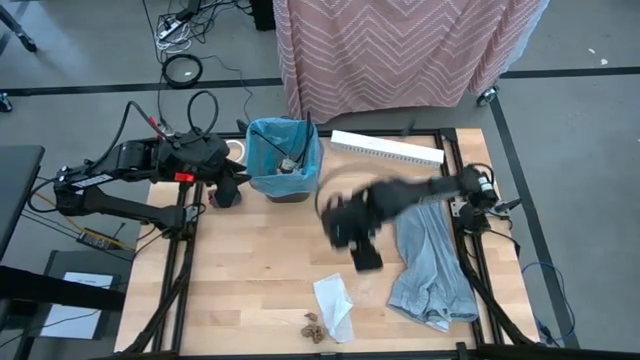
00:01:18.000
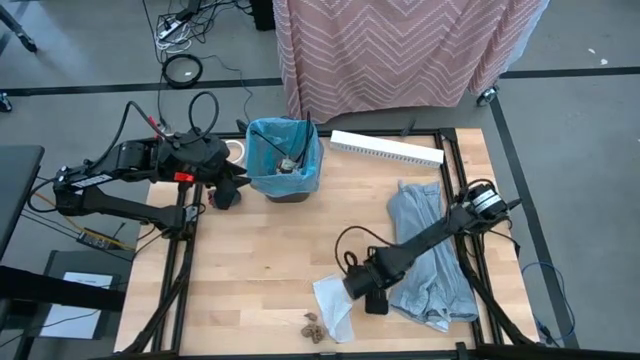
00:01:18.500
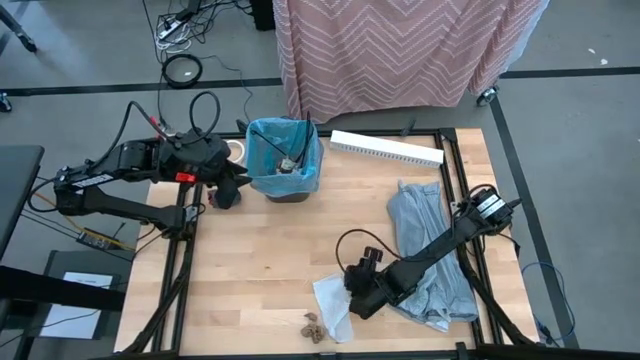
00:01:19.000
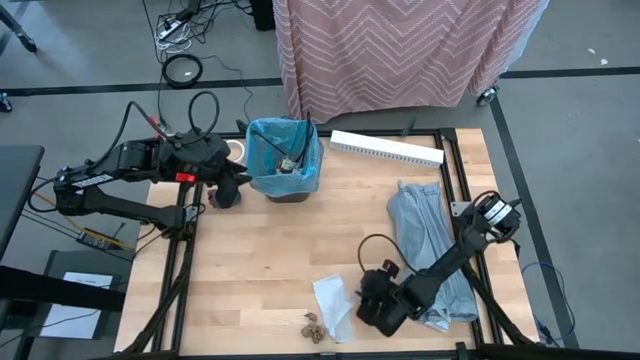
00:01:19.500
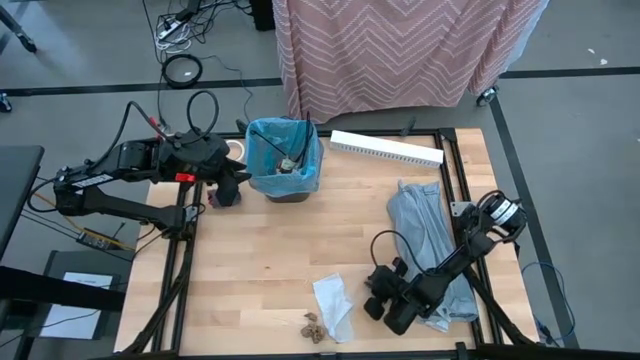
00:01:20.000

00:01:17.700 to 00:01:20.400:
Task: place trash/remove bag and relplace
Put the transparent piece of plastic into the black trash bin

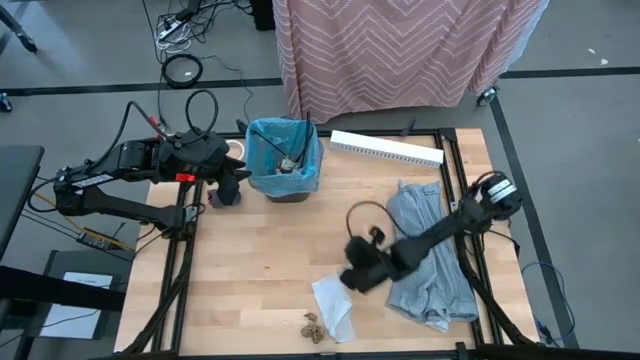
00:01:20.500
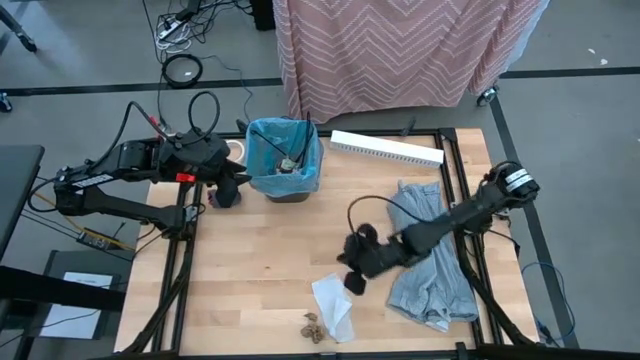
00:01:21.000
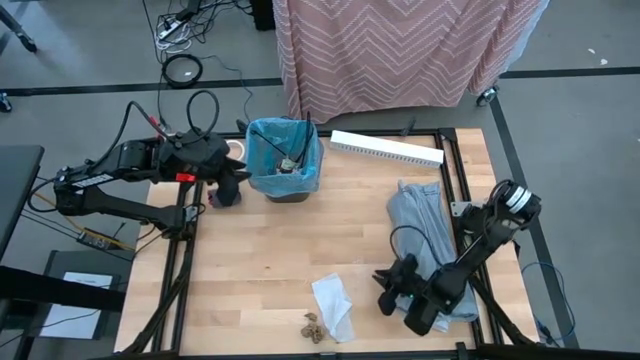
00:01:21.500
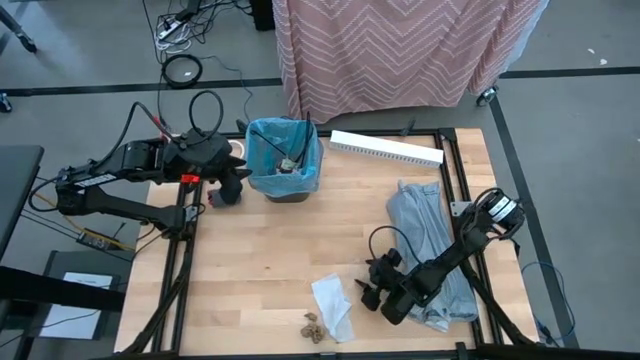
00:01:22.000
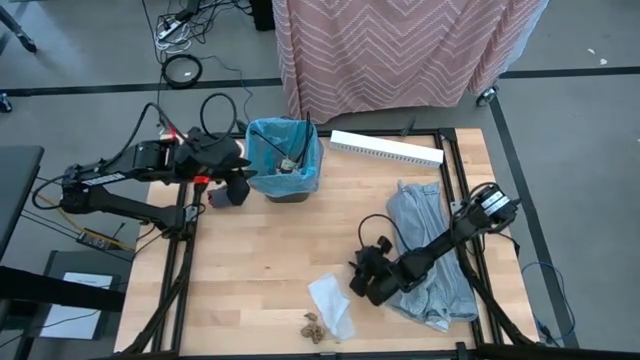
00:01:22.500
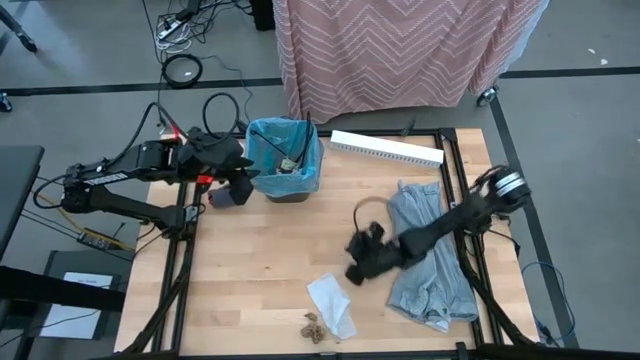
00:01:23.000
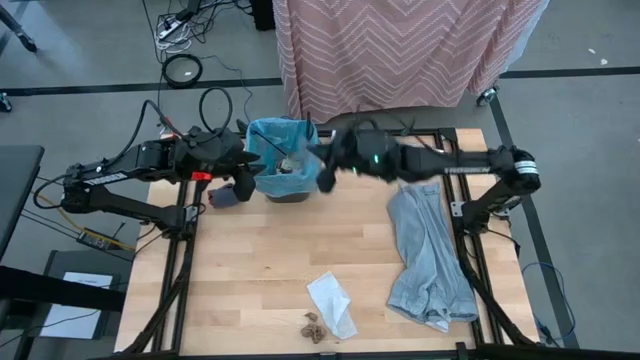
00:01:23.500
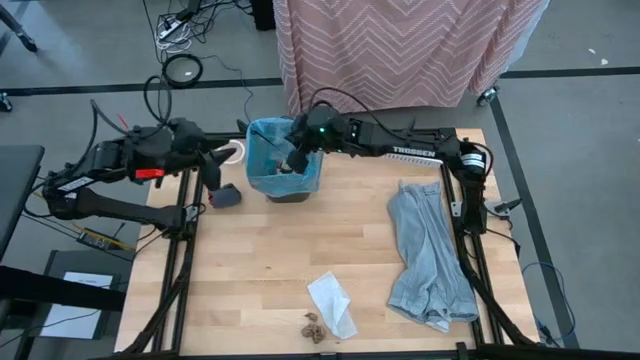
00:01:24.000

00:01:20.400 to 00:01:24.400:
Put the transparent piece of plastic into the black trash bin

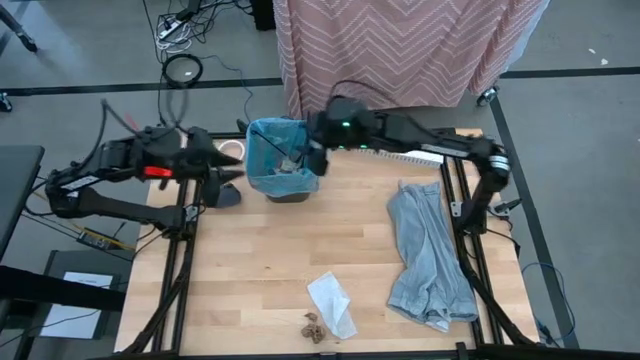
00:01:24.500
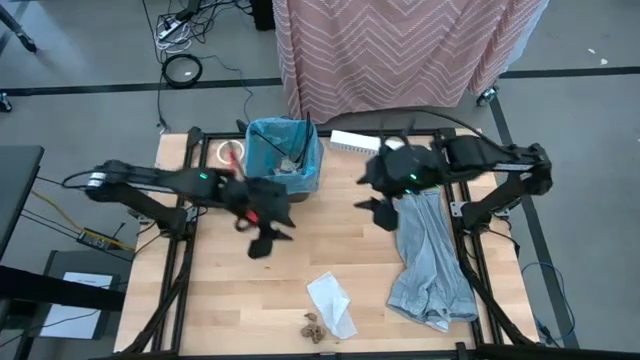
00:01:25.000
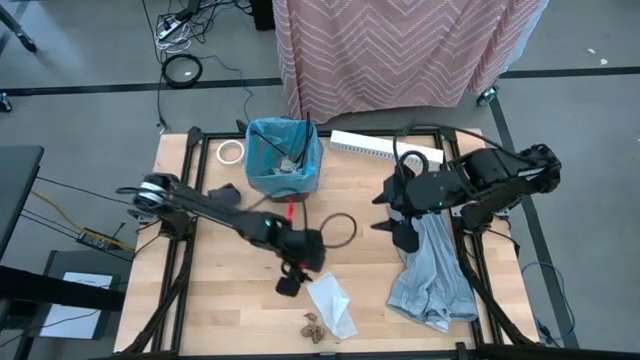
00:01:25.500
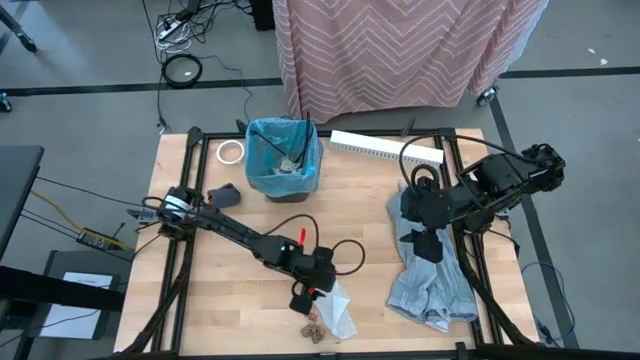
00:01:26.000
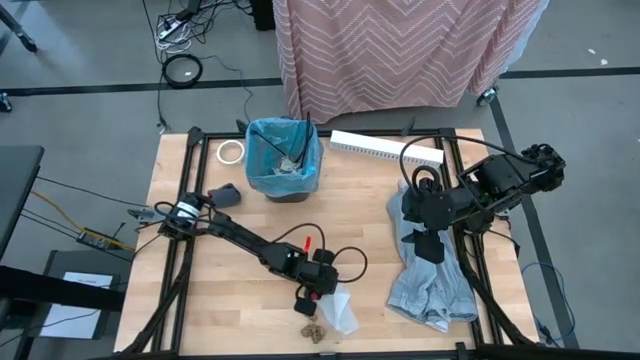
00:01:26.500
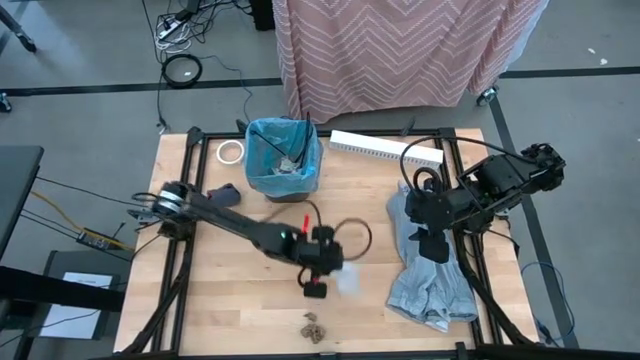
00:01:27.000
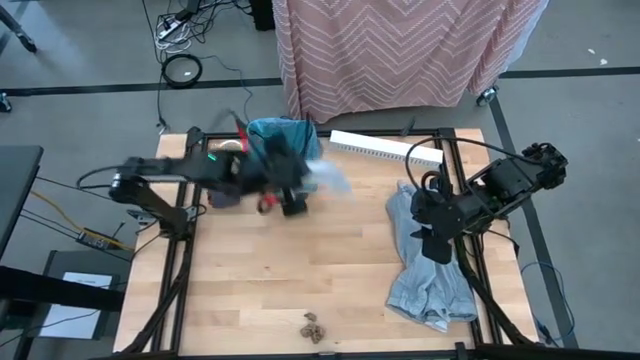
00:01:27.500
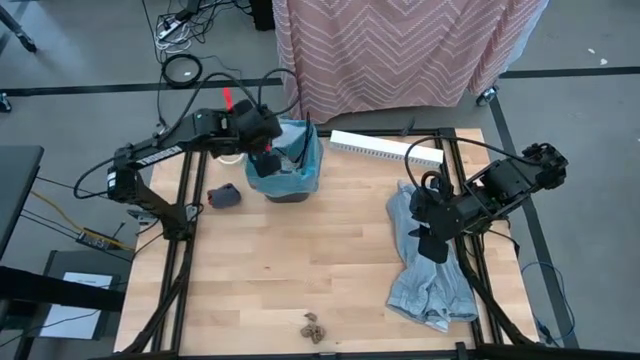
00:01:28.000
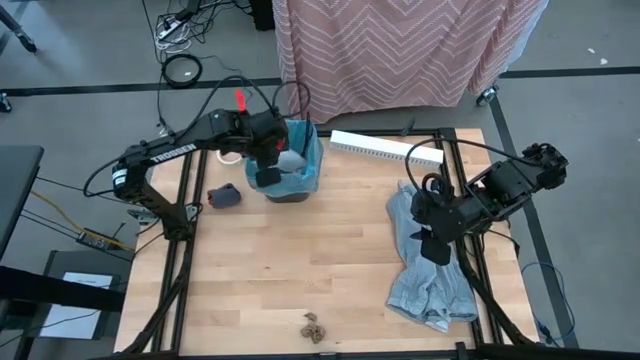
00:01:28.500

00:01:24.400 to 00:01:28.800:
Put the white tissue into the black trash bin

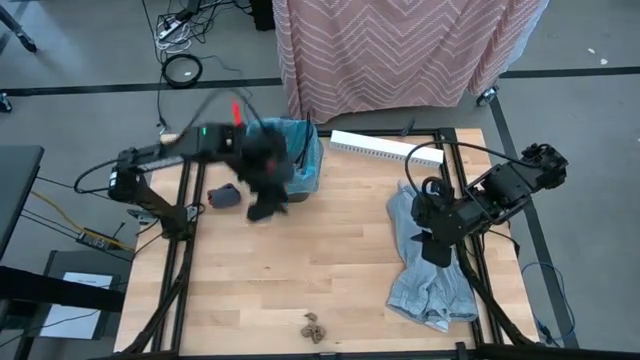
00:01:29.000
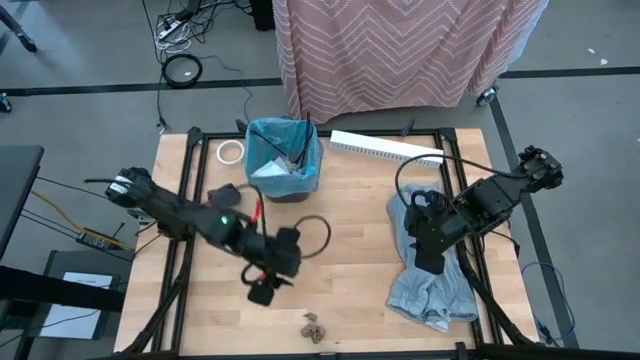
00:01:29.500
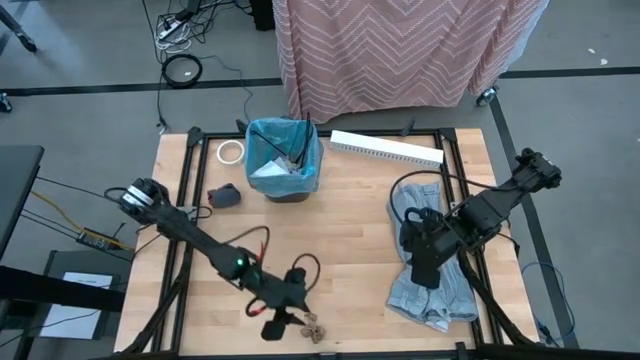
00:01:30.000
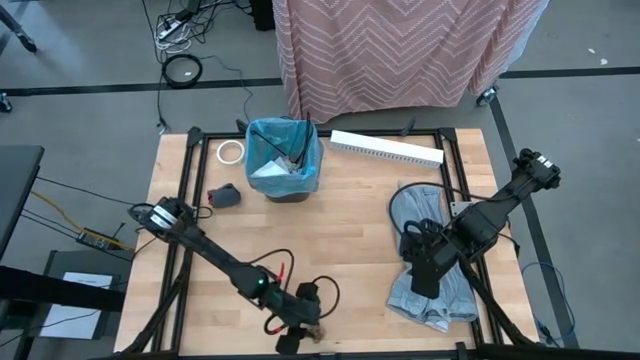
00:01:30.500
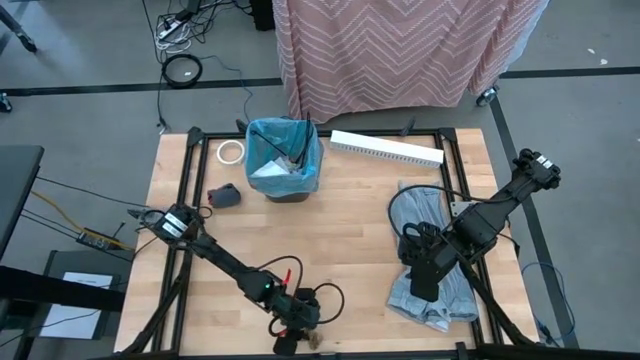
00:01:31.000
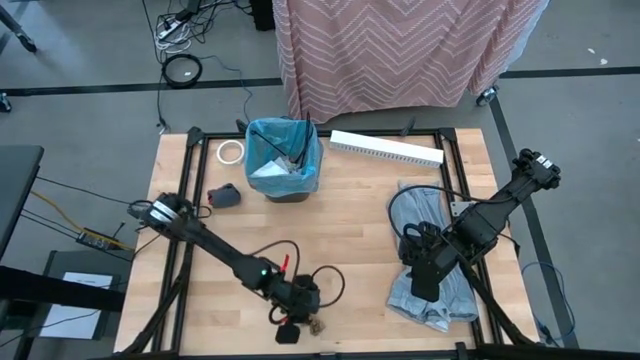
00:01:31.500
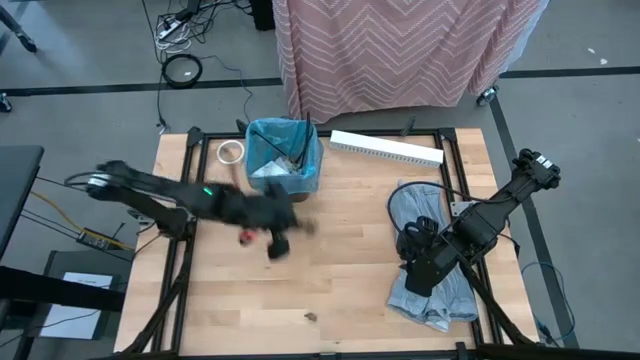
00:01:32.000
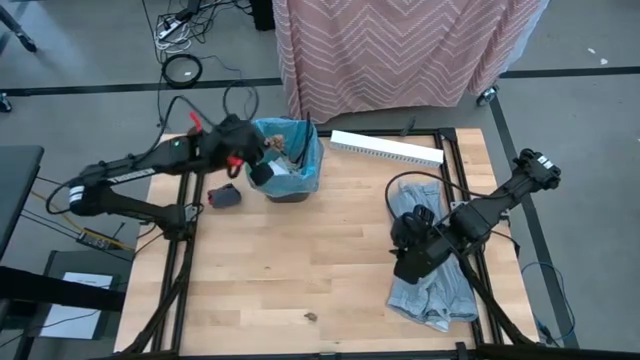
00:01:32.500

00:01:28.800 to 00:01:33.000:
Put the brown napkin into the black trash bin

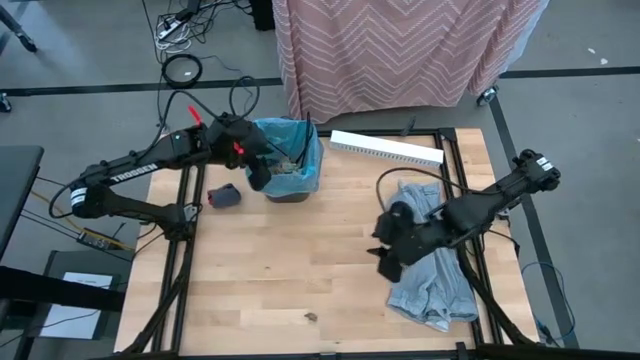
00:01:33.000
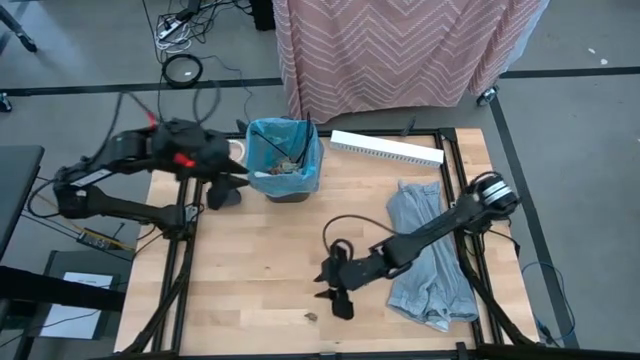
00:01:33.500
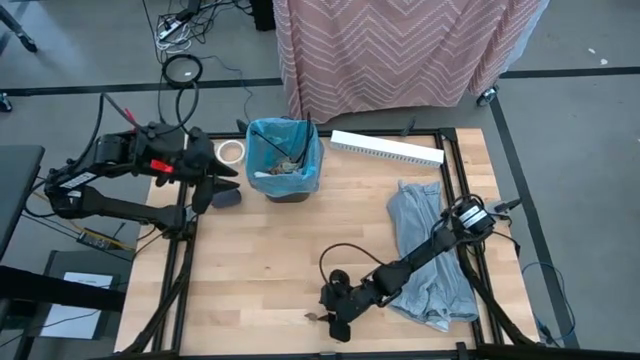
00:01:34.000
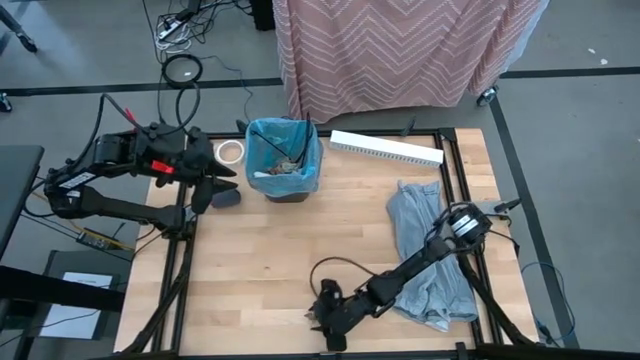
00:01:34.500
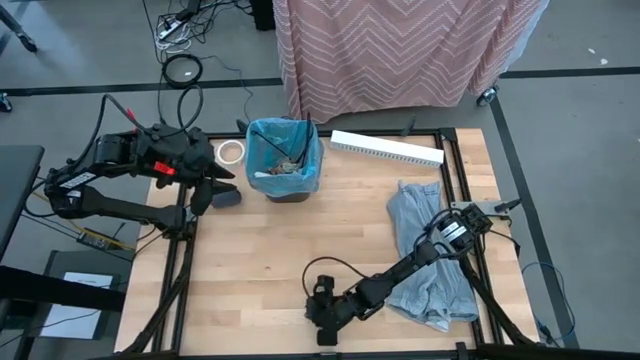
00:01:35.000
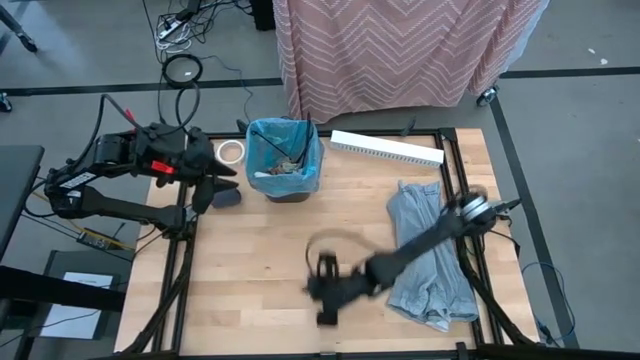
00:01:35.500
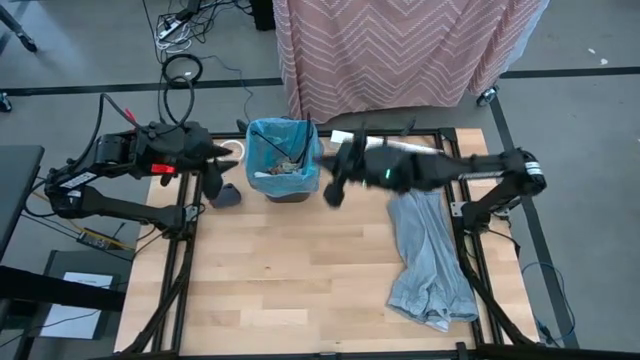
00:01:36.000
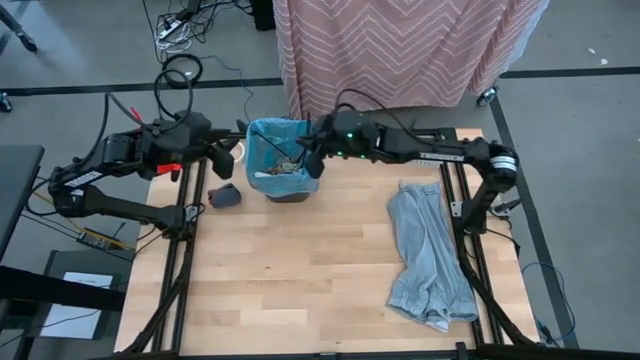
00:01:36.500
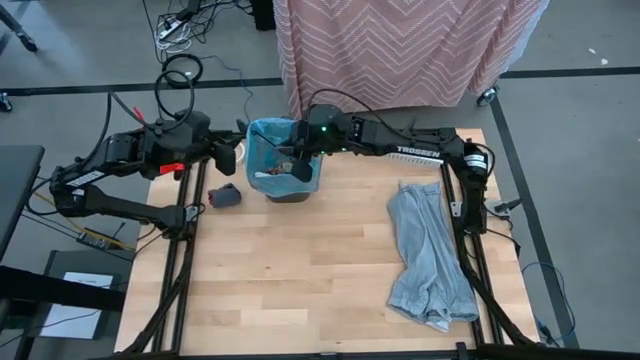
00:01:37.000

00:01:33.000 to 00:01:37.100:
Put the brown napkin into the black trash bin

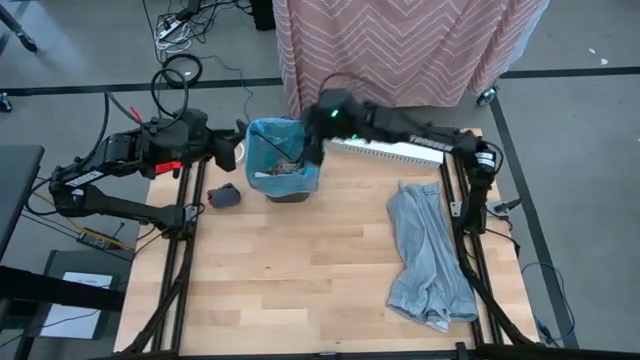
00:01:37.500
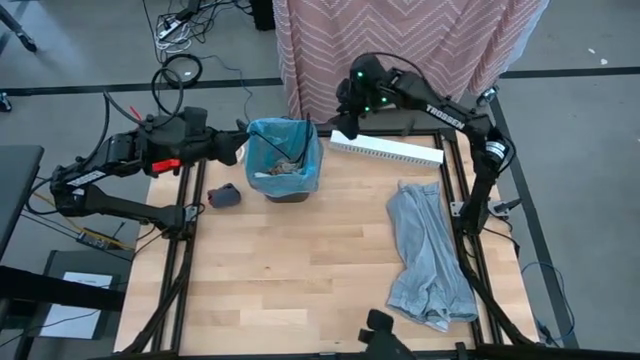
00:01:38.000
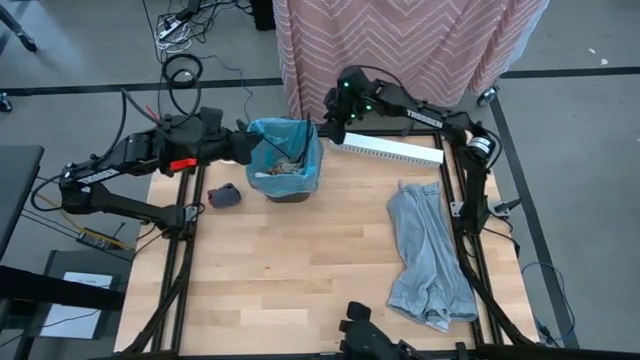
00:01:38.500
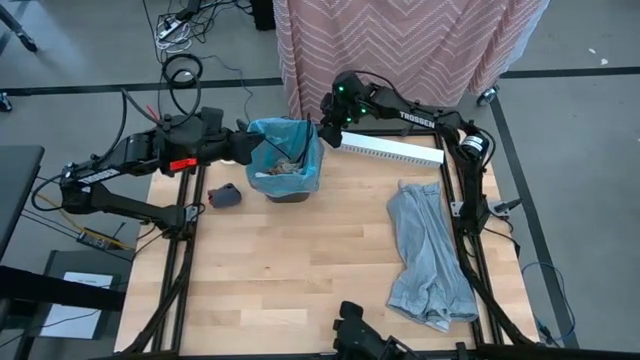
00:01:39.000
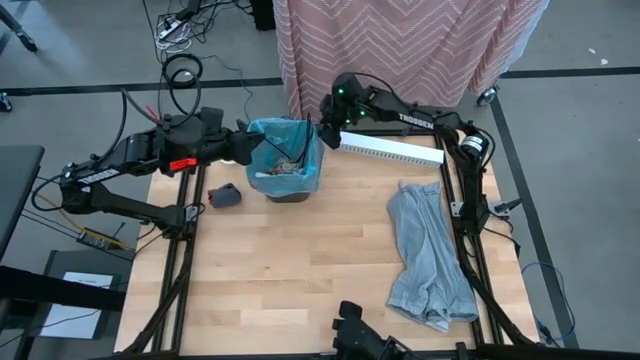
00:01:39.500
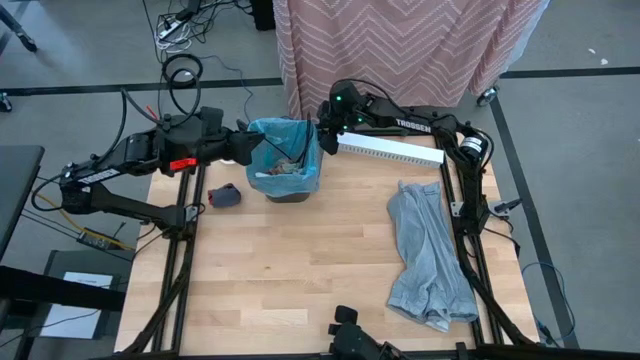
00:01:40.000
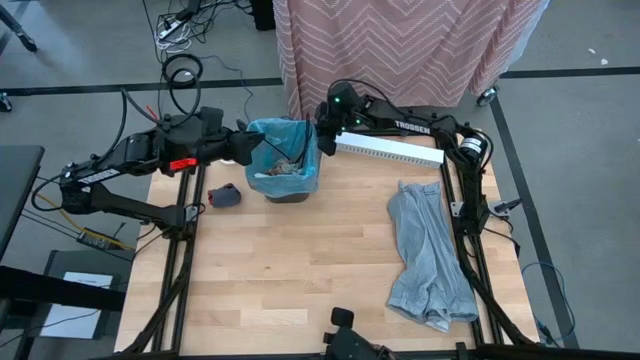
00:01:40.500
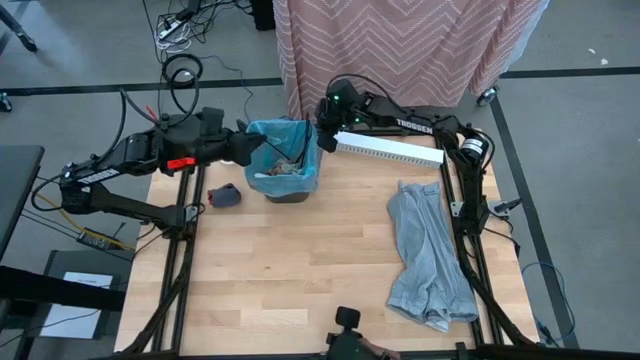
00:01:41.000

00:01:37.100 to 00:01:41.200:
Remove the blue trash bag from the black trash bin
